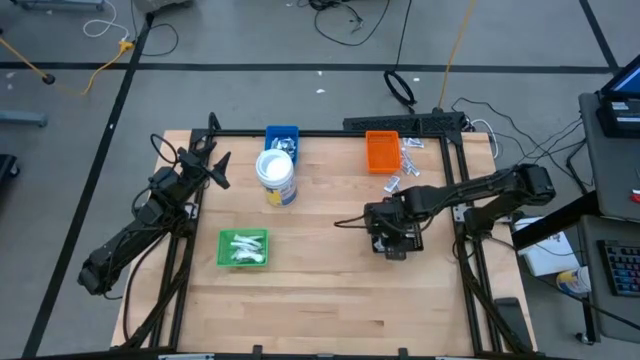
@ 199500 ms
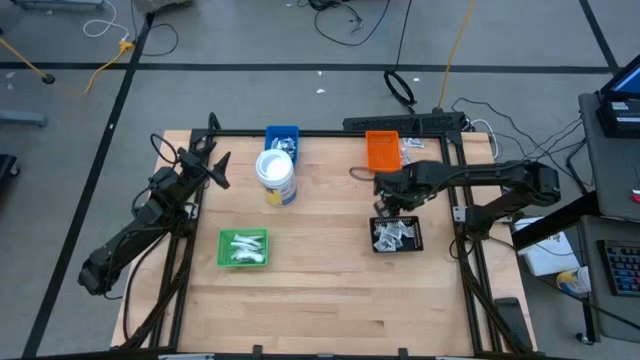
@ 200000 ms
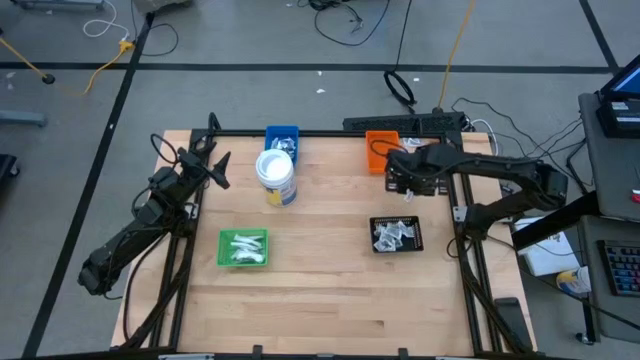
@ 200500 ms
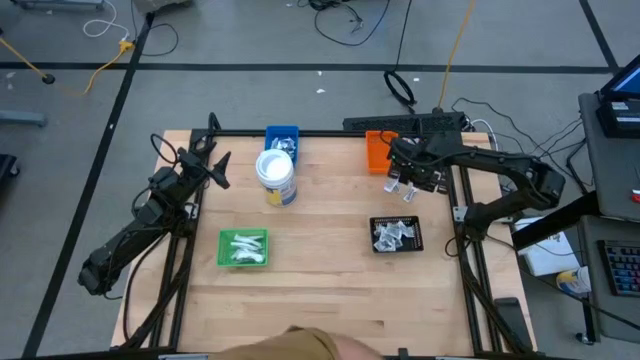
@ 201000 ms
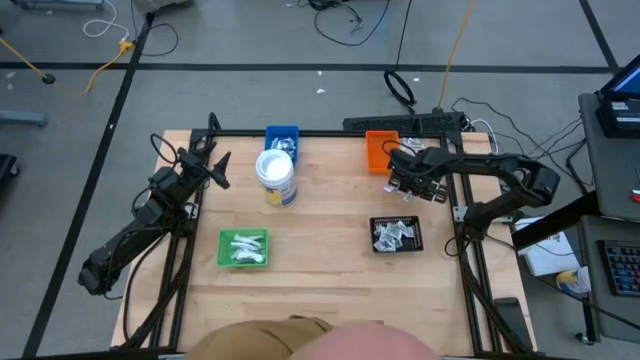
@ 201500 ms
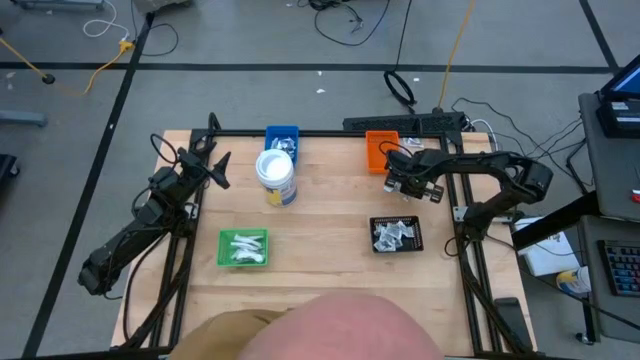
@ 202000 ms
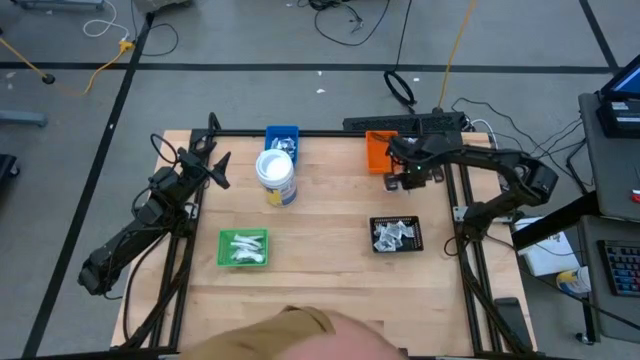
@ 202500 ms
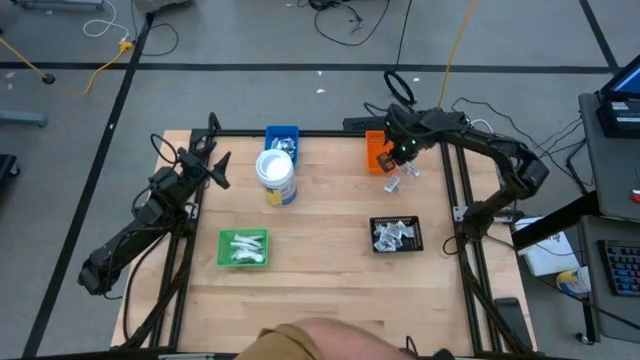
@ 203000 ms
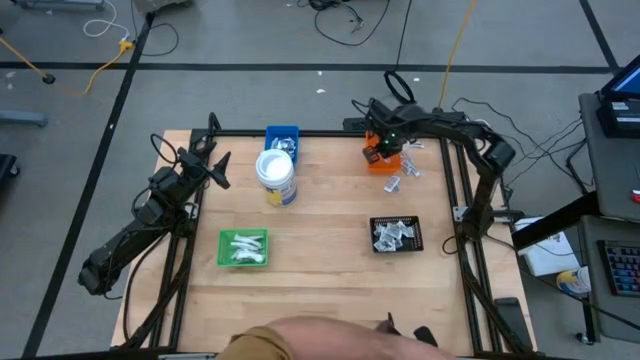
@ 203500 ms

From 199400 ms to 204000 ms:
Task: Pick & Place First Aid Supplies
Put the orange ointment pack into the orange bin

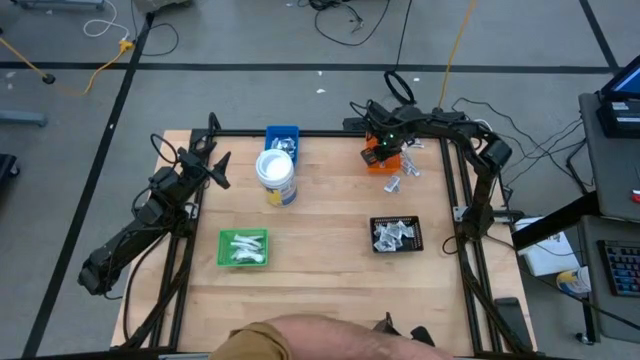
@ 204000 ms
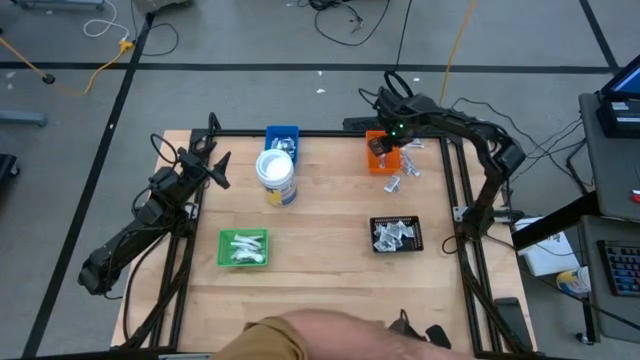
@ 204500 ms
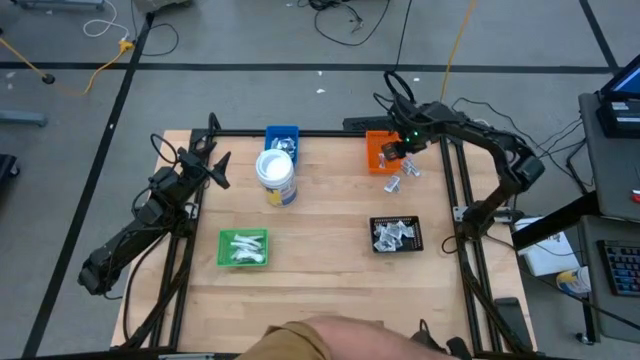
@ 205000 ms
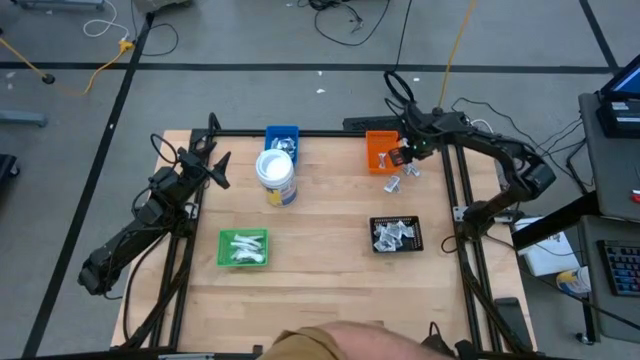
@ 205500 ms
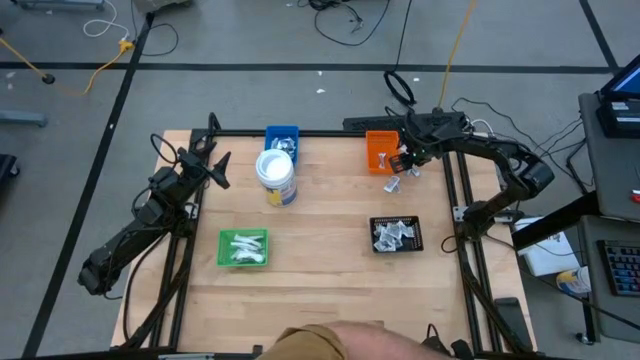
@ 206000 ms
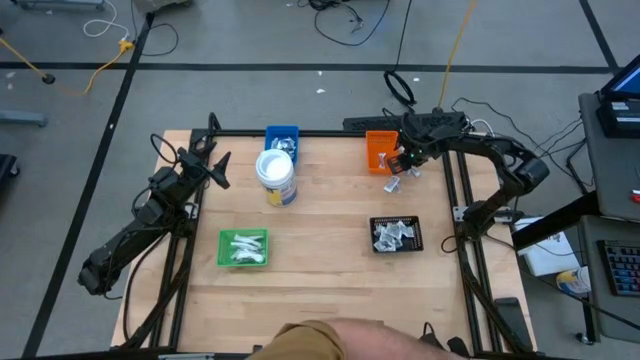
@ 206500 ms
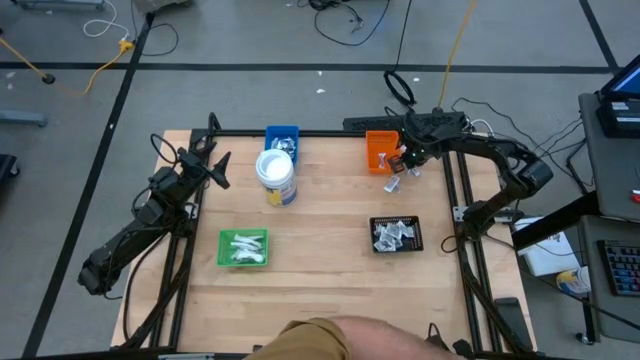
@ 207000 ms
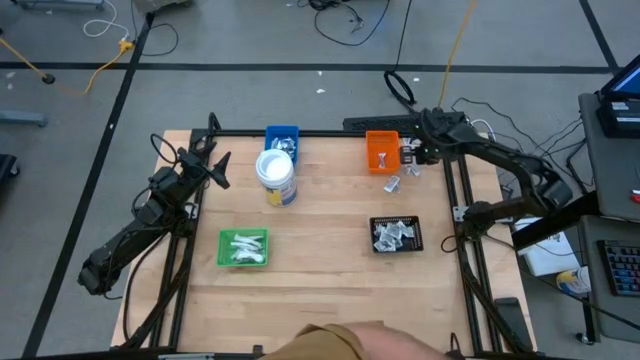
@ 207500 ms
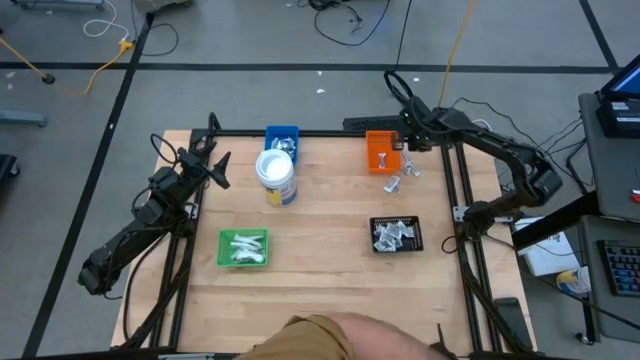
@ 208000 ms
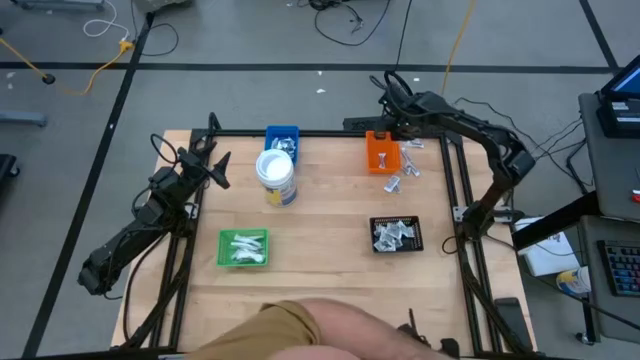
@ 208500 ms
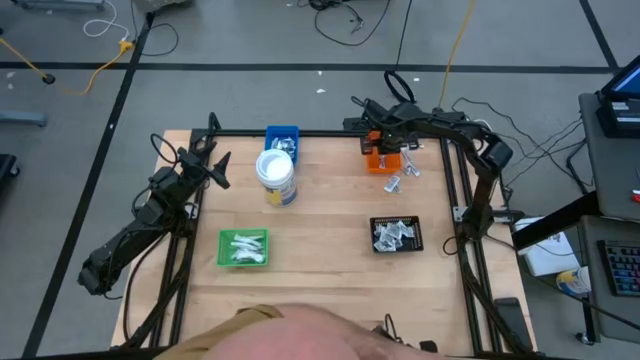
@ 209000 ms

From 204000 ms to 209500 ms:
Put the orange ointment pack into the orange bin

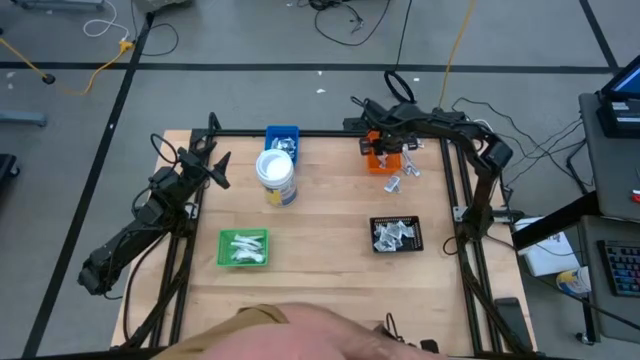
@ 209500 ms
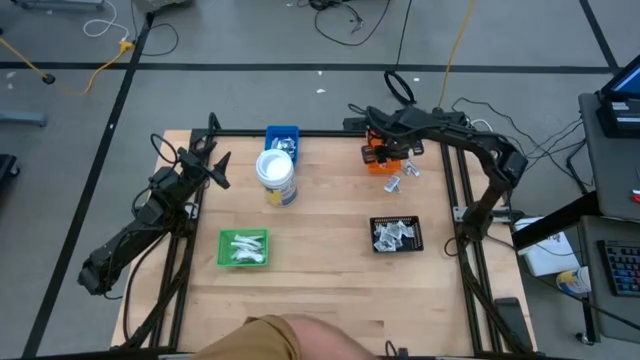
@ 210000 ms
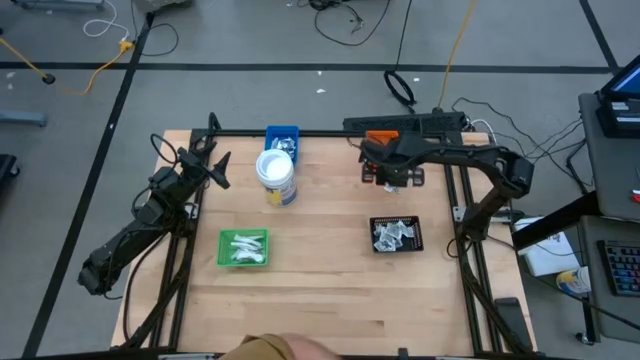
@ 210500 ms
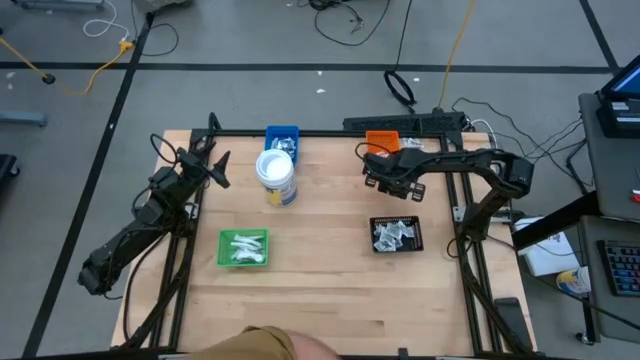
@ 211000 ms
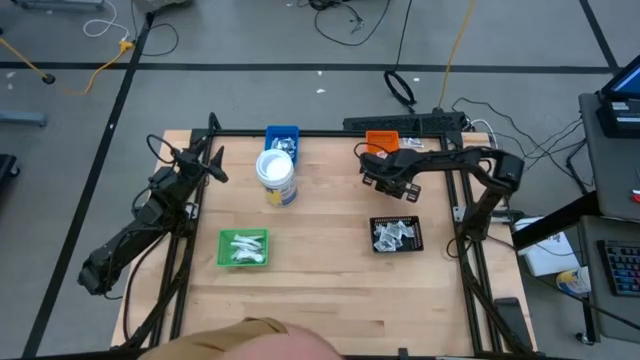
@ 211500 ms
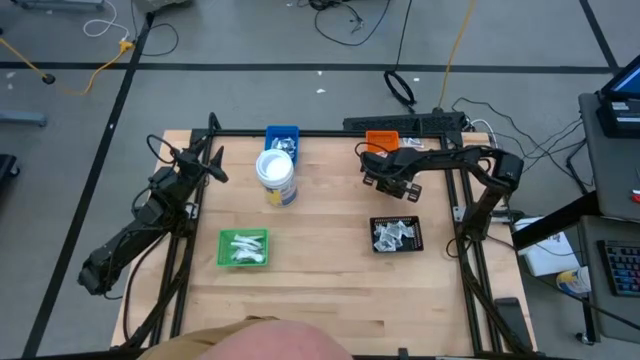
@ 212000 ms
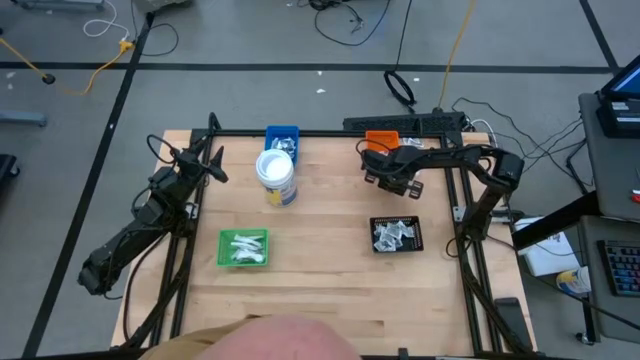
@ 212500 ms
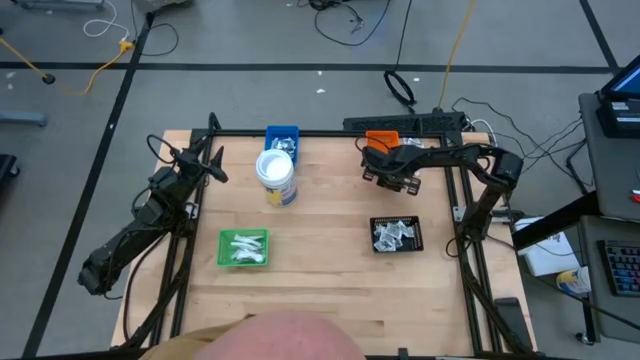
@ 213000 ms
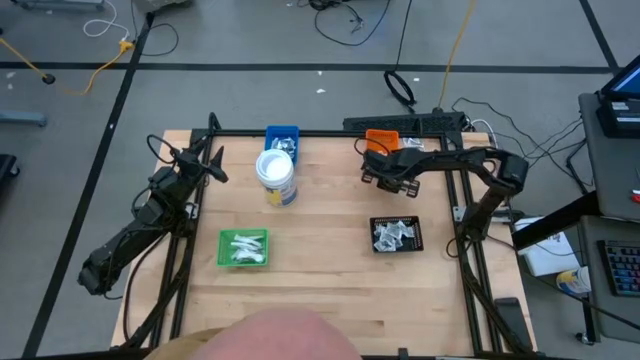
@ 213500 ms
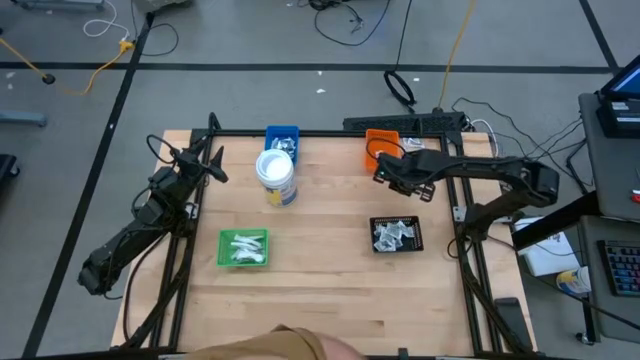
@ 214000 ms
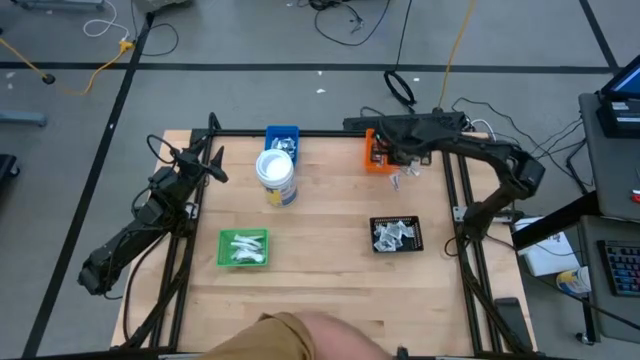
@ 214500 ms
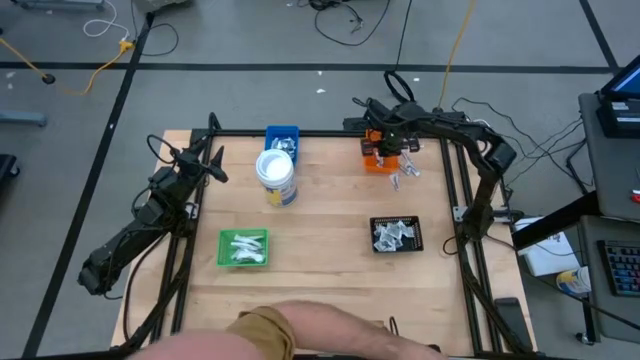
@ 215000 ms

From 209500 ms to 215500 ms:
Put the orange ointment pack into the orange bin

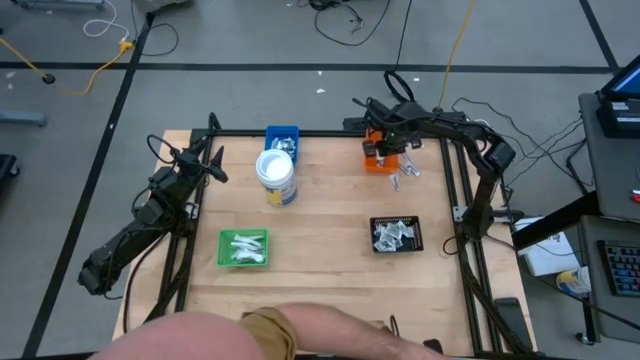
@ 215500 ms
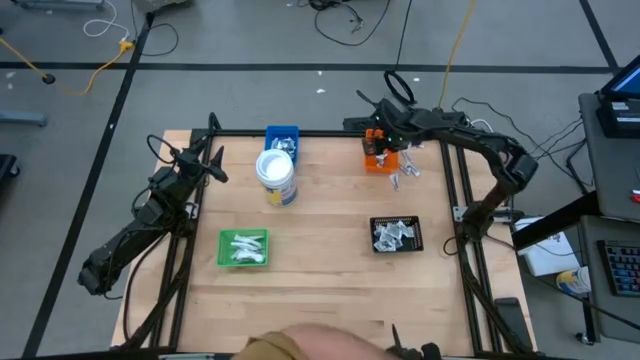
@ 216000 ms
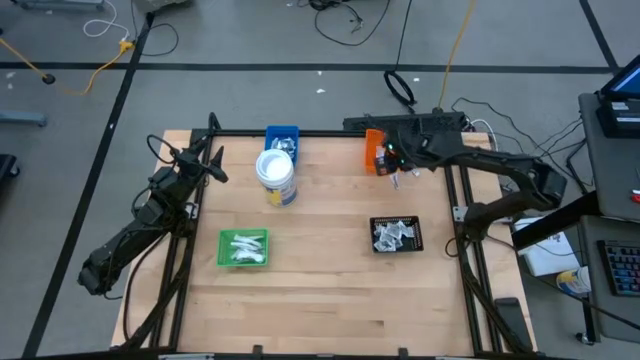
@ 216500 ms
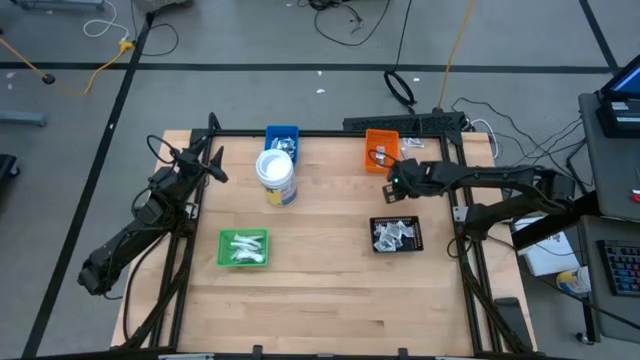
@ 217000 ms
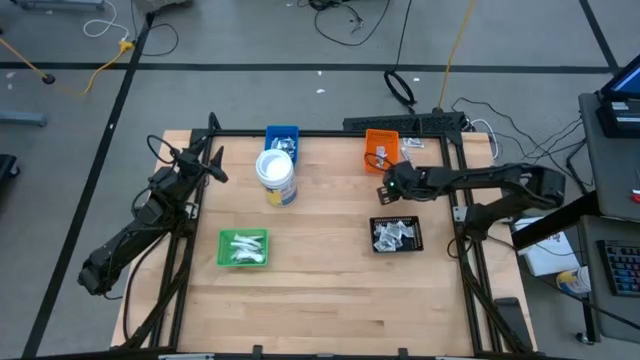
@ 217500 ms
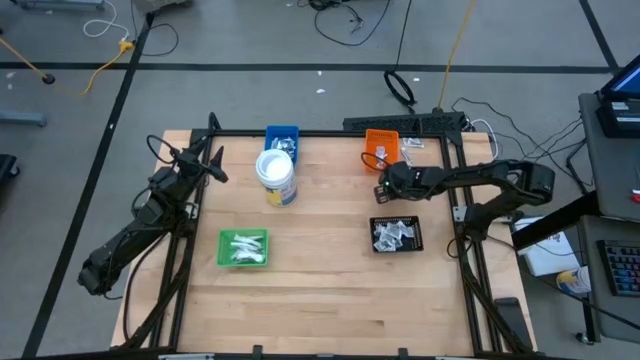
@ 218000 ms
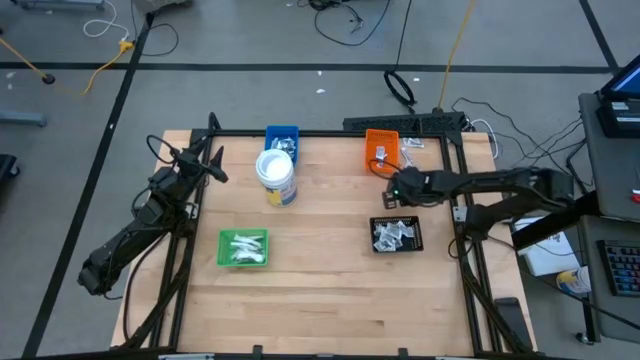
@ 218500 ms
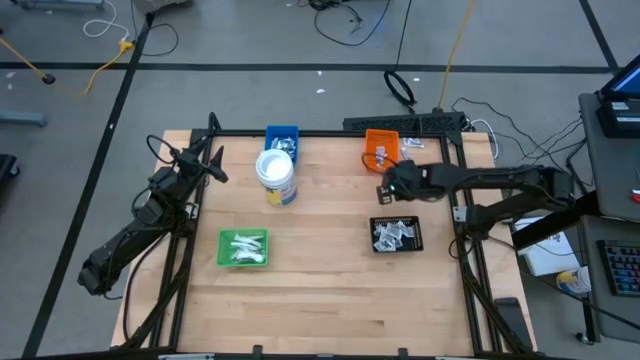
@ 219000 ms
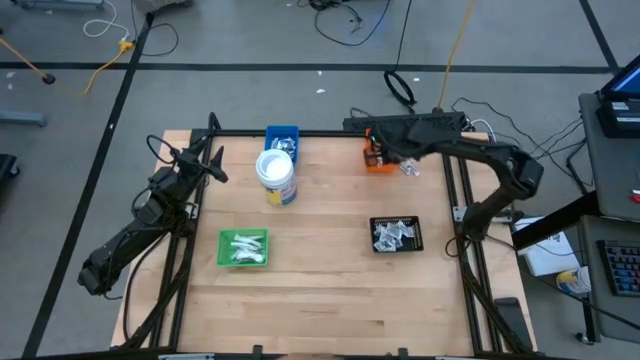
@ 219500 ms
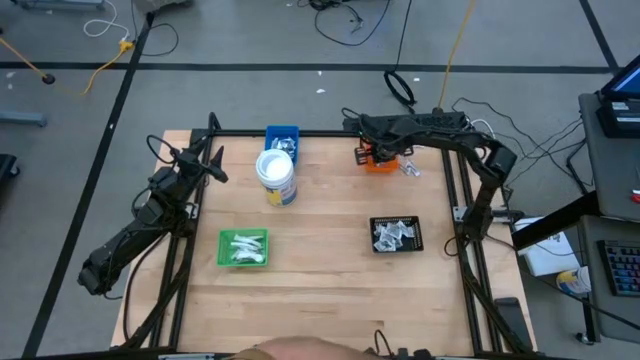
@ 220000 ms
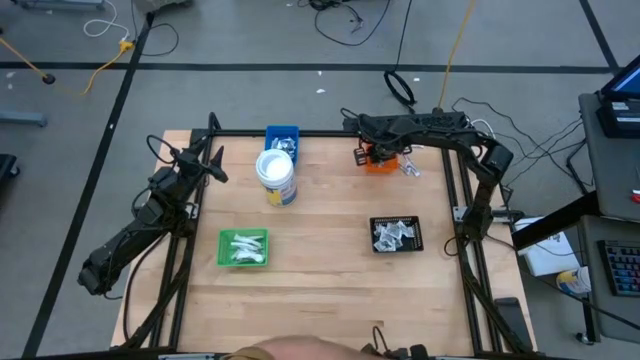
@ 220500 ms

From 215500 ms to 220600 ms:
Put the orange ointment pack into the orange bin
